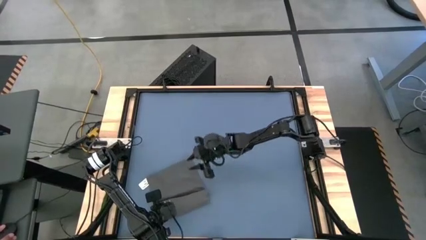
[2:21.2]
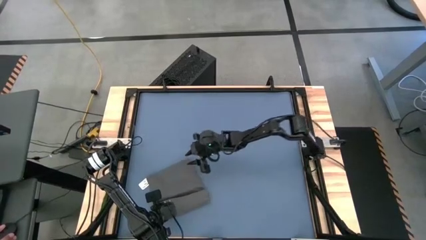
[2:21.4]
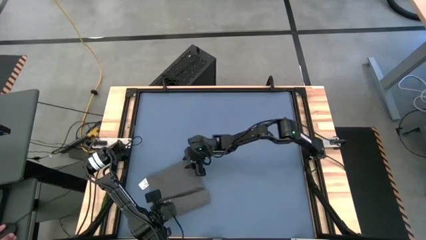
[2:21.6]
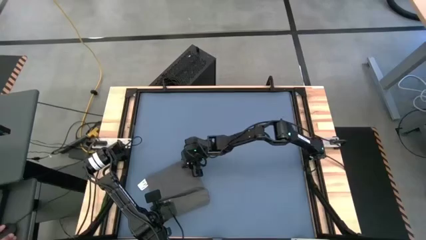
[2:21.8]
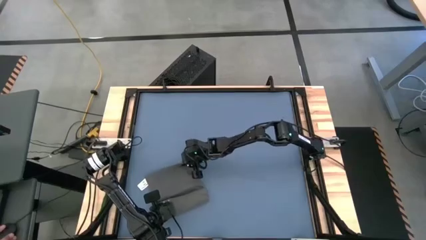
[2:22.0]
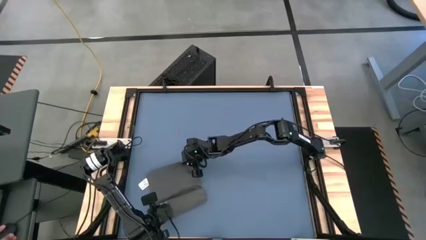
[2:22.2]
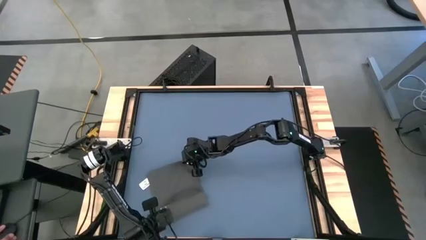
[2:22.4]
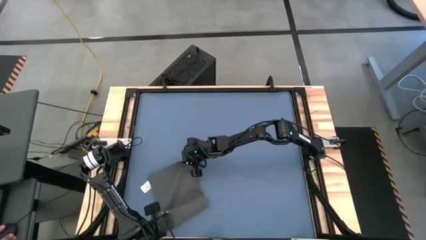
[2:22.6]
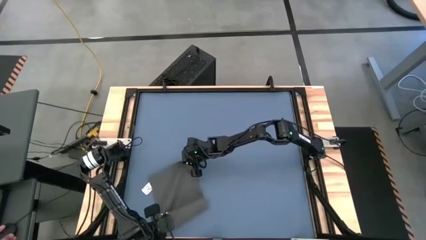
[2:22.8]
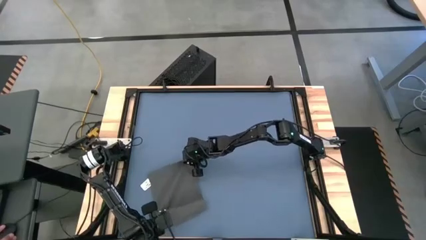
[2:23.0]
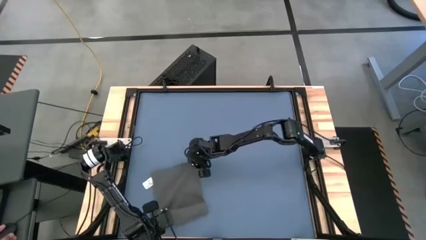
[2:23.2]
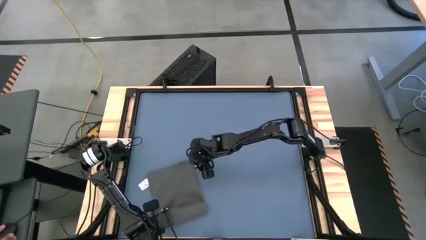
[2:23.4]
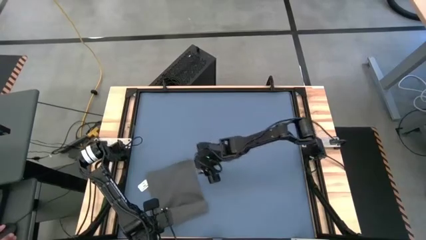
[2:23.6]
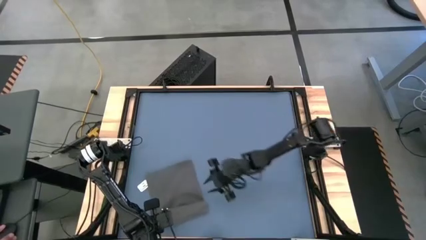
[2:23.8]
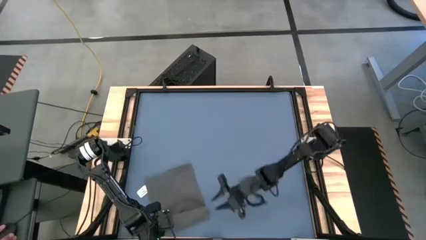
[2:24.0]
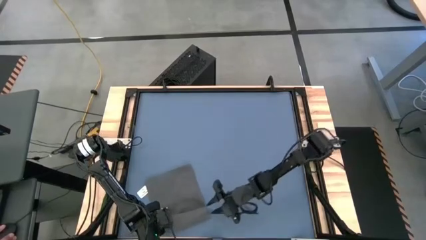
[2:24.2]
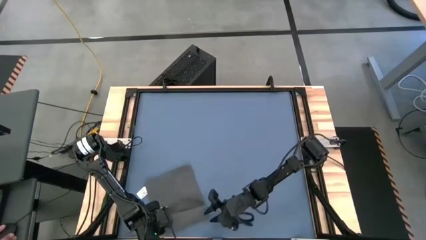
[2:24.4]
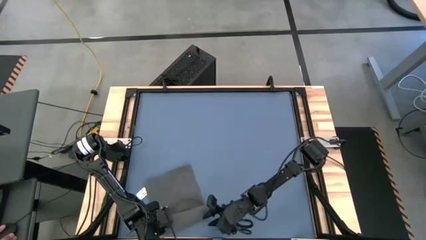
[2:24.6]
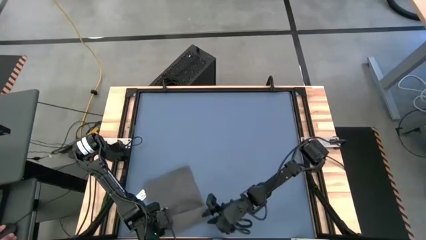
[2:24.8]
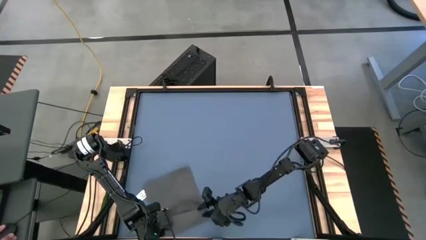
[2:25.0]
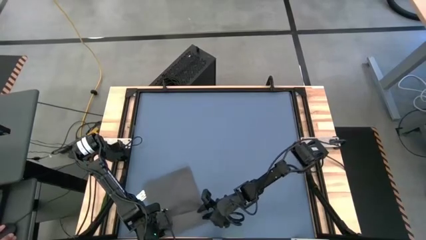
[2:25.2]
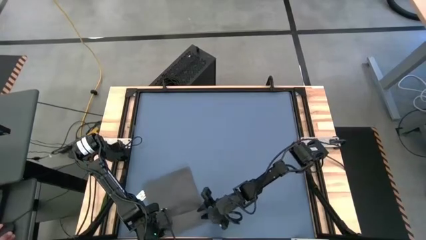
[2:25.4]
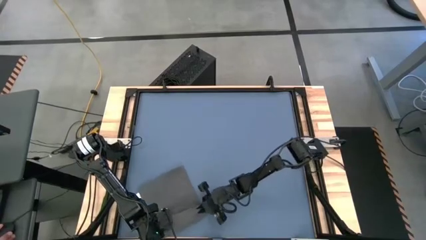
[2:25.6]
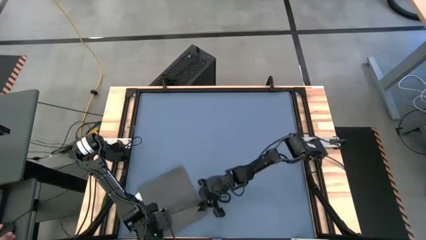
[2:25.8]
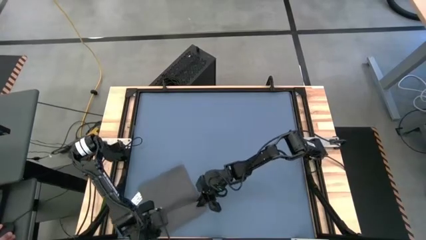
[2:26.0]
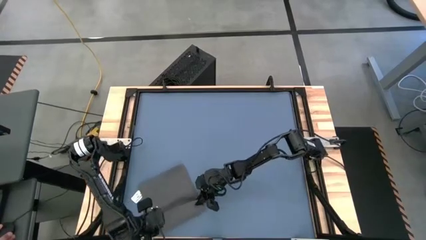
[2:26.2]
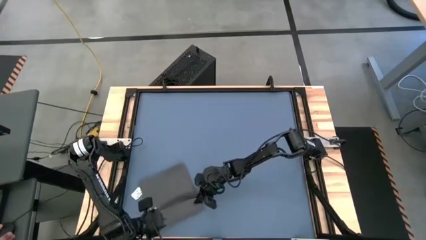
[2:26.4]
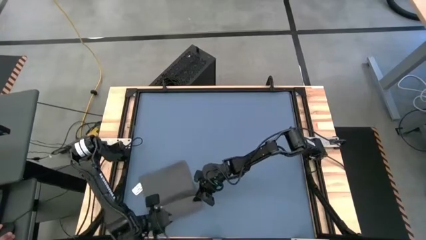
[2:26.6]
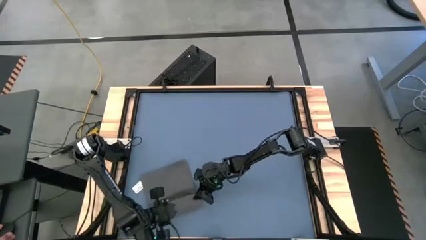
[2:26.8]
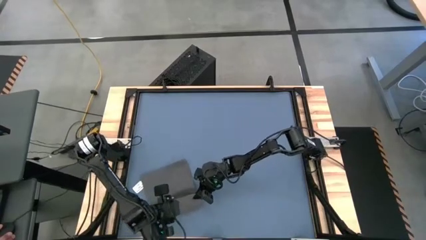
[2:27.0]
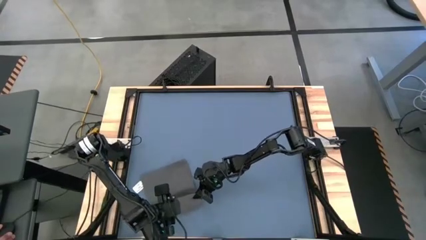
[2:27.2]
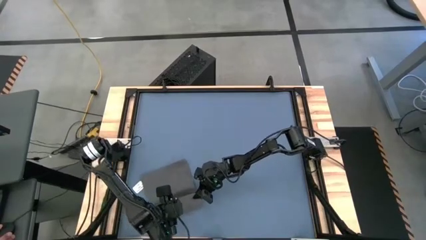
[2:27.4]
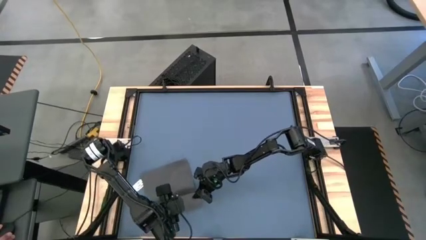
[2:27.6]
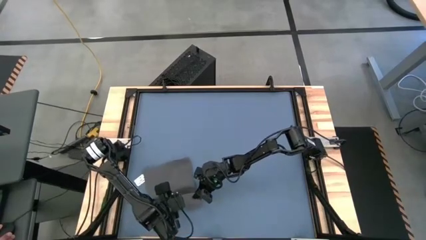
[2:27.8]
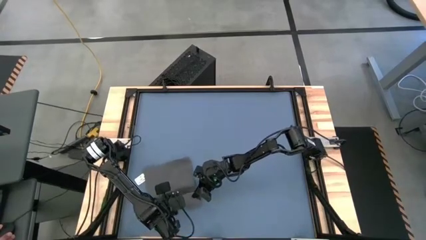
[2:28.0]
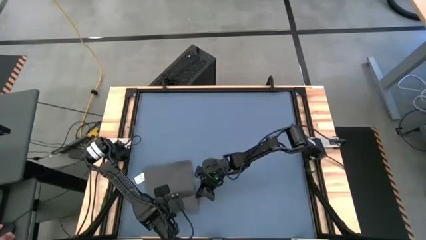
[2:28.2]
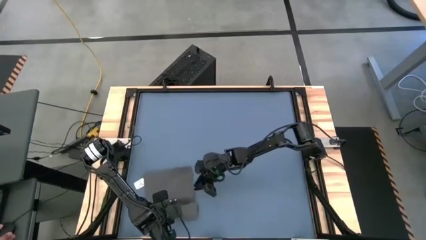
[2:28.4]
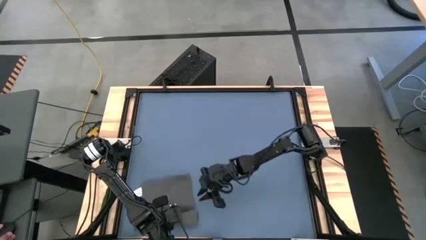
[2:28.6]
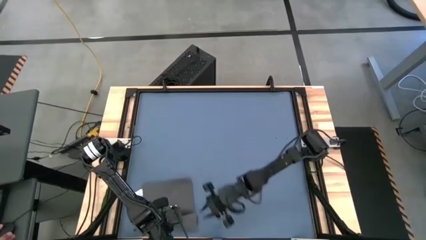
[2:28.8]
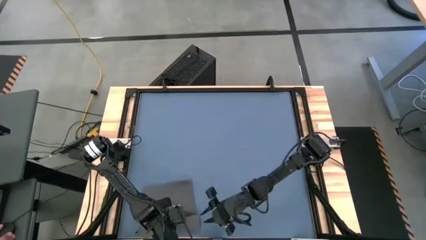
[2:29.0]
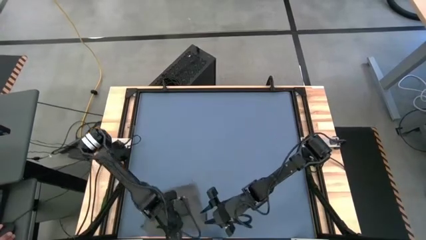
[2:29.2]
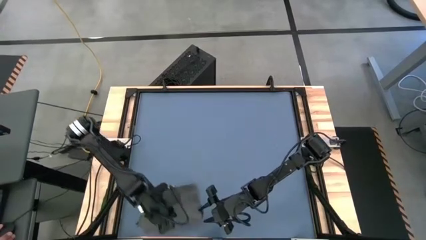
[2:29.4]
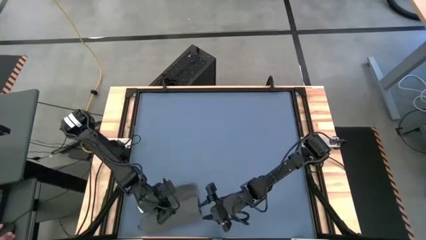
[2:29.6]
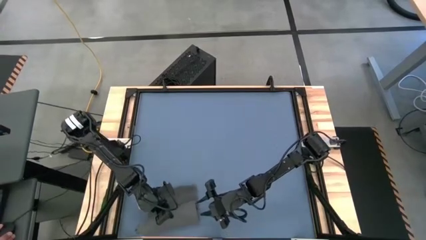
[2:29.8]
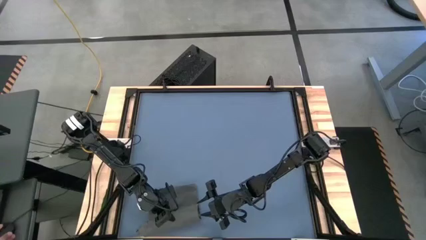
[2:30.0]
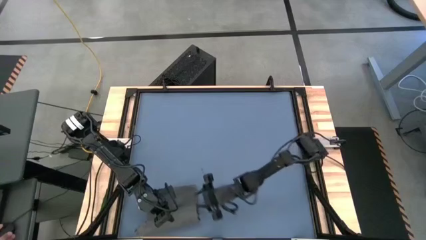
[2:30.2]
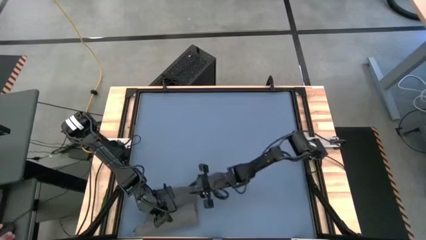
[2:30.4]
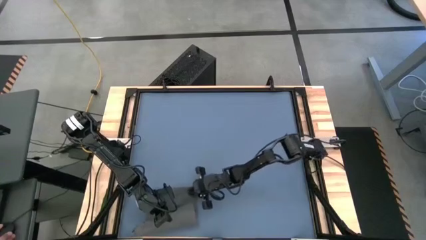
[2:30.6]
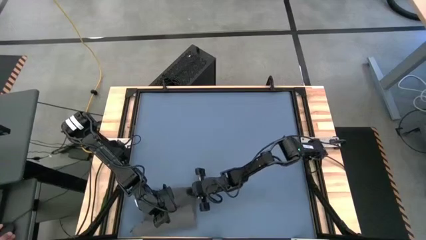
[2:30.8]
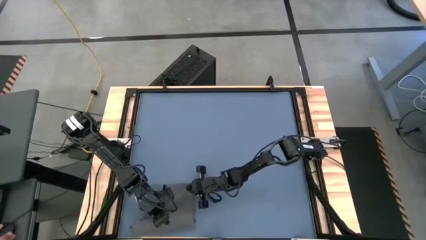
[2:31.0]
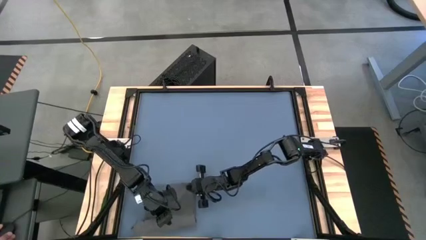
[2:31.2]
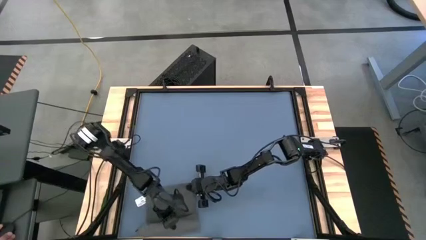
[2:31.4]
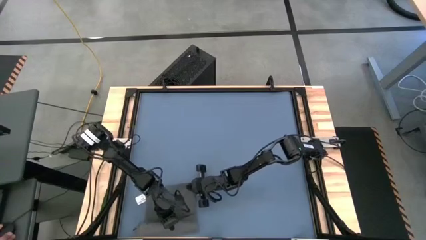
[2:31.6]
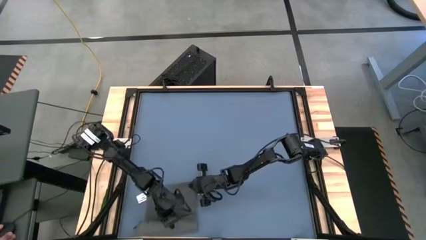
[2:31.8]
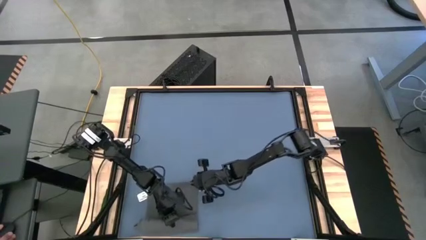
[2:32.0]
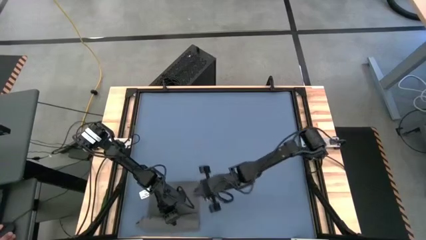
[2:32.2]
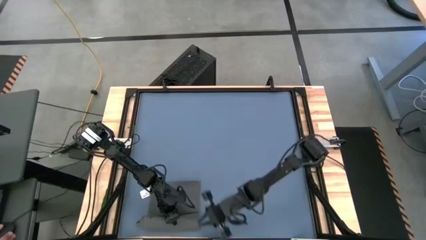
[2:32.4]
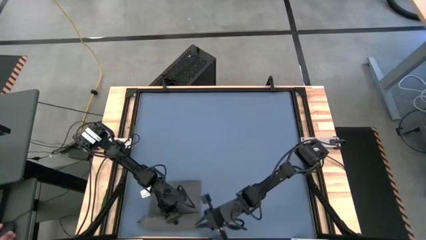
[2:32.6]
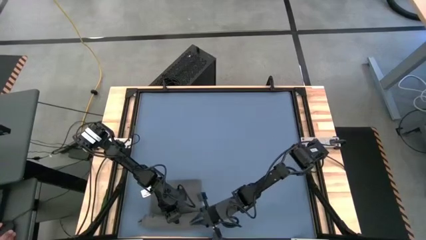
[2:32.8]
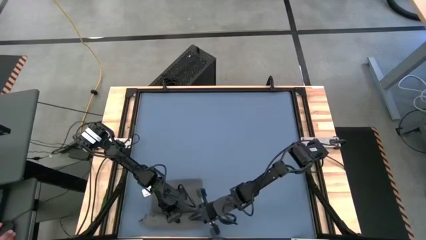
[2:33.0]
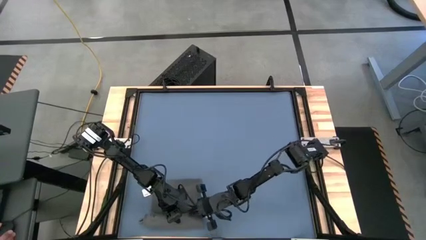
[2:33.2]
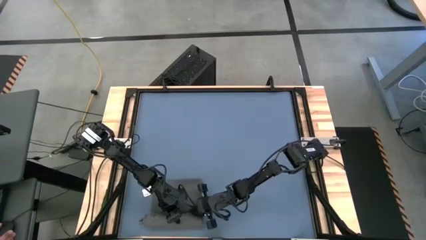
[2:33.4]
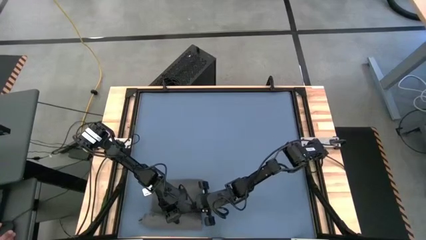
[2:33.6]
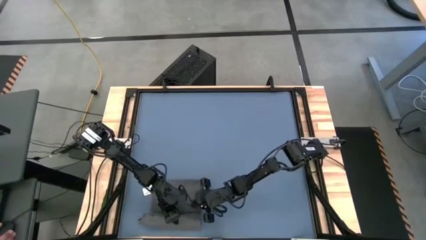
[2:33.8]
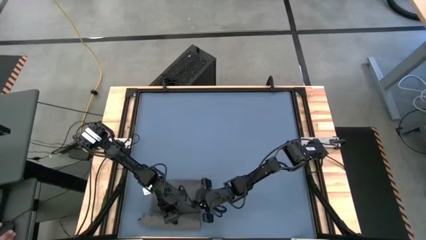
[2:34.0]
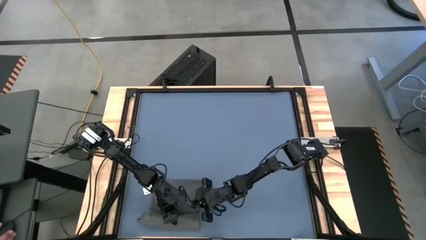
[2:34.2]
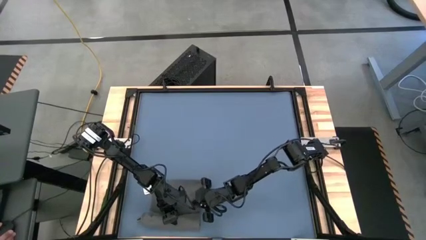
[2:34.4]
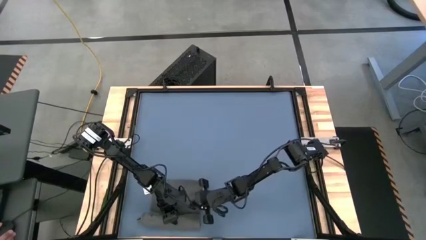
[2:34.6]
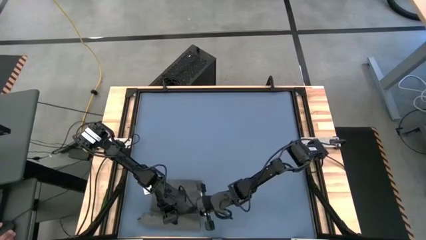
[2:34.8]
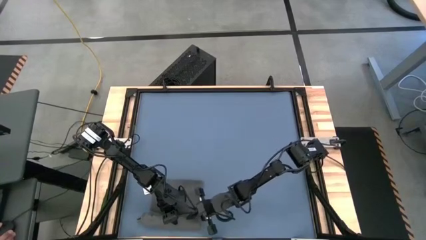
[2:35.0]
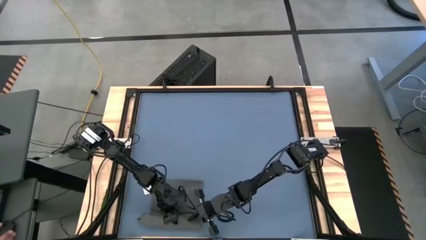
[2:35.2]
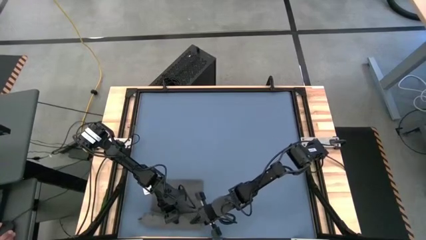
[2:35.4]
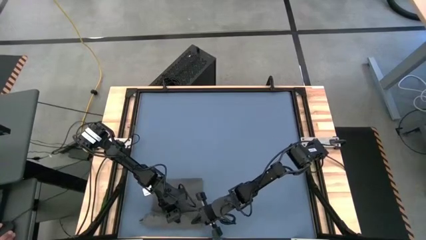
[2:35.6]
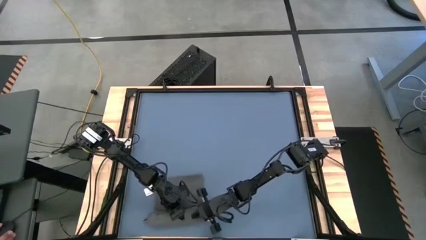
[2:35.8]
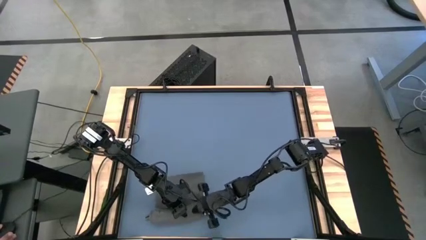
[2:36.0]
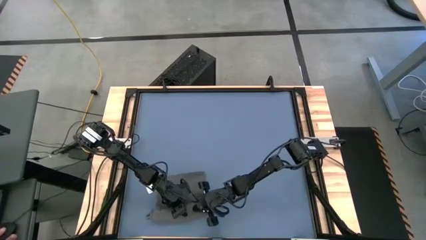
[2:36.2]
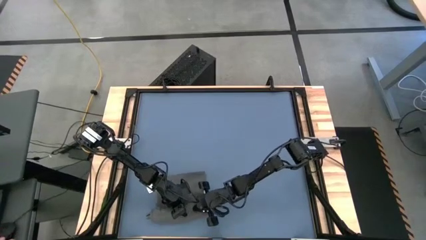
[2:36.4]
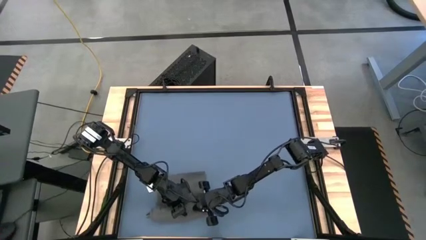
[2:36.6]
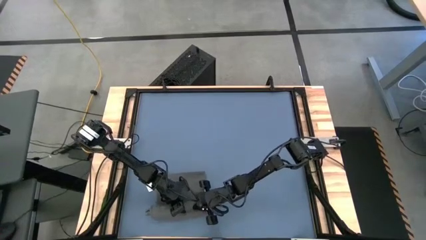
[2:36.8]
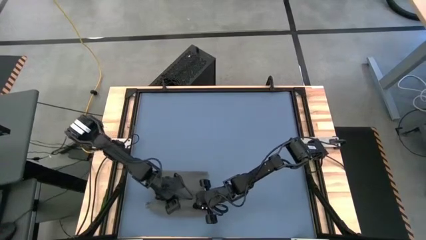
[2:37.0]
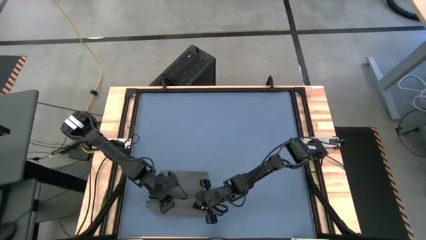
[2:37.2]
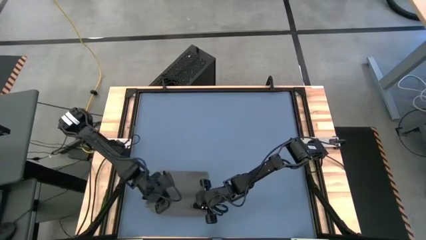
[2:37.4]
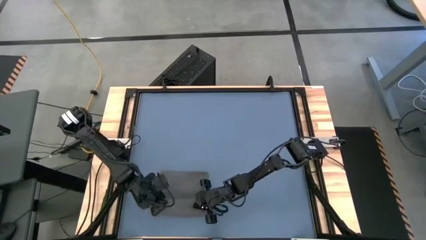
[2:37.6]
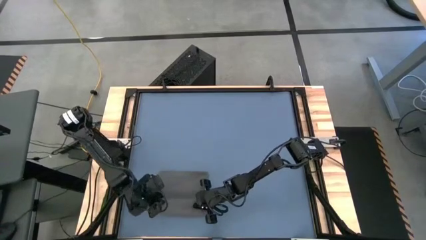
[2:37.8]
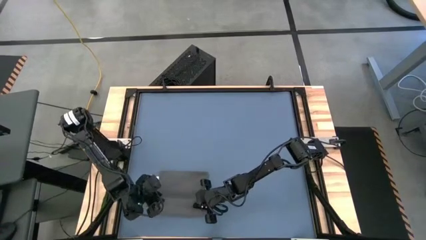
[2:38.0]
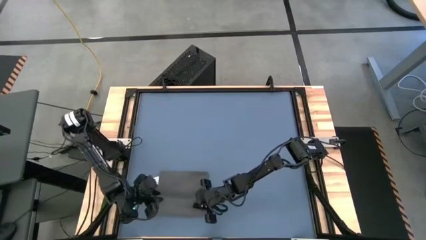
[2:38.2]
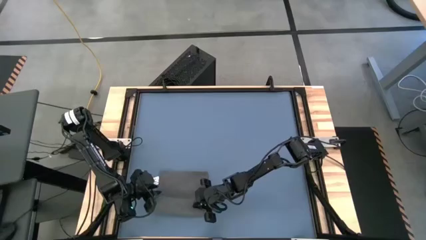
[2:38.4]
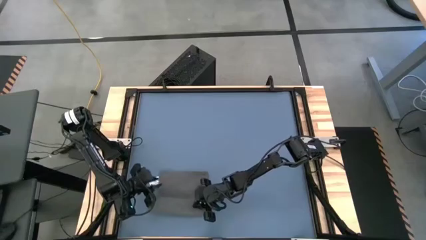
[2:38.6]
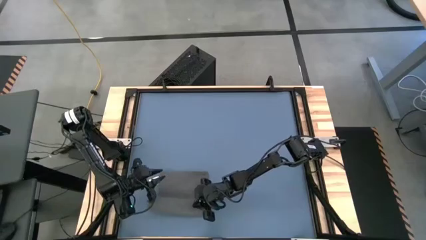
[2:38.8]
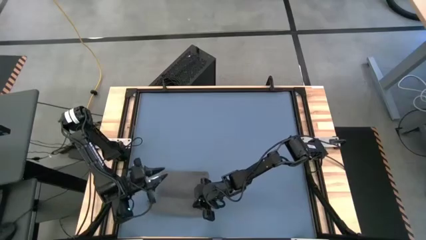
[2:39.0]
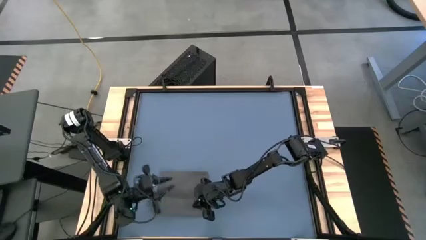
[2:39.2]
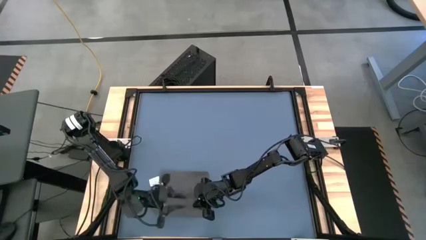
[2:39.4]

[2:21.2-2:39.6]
Task: Roll towel into tight, uniform cylinder
Roll the gray towel
